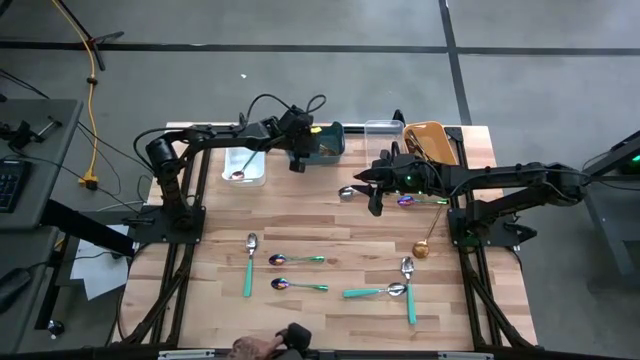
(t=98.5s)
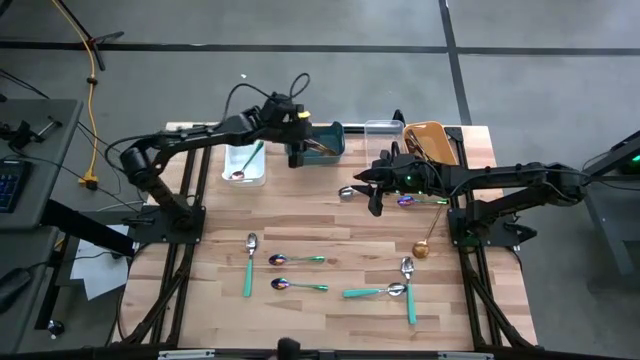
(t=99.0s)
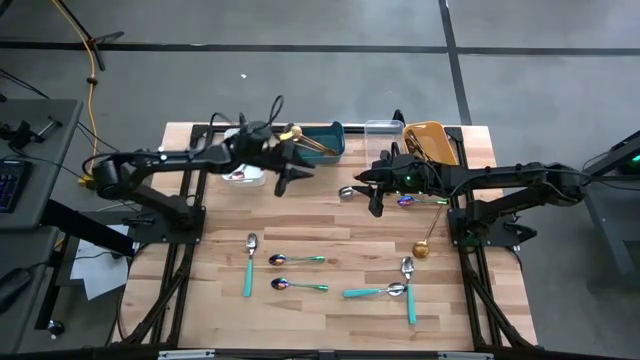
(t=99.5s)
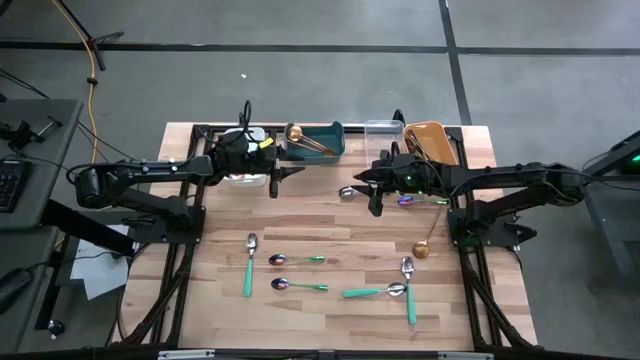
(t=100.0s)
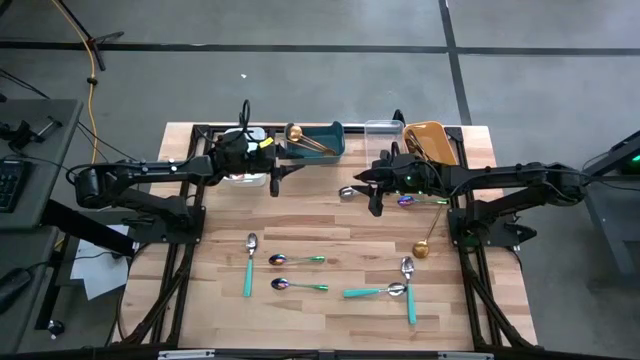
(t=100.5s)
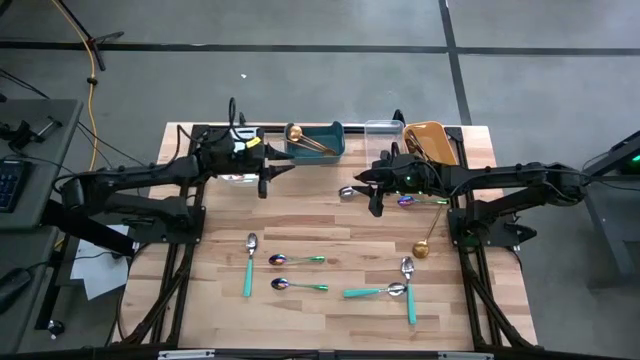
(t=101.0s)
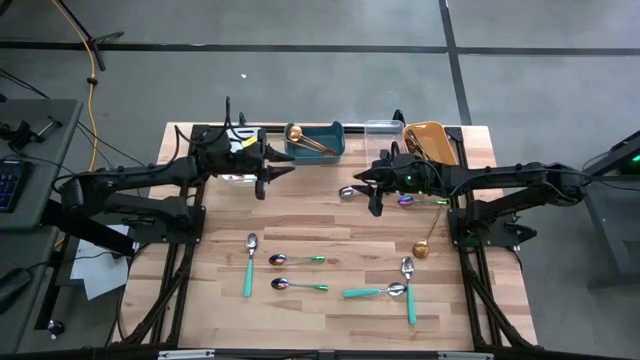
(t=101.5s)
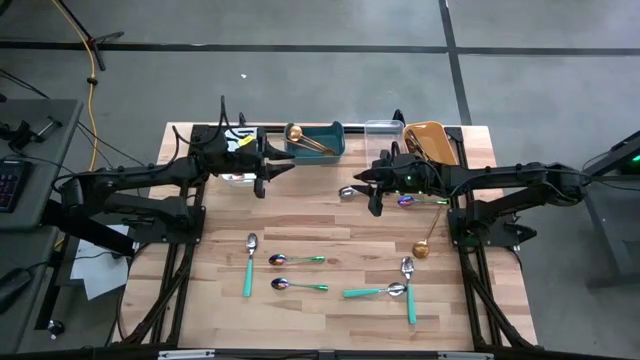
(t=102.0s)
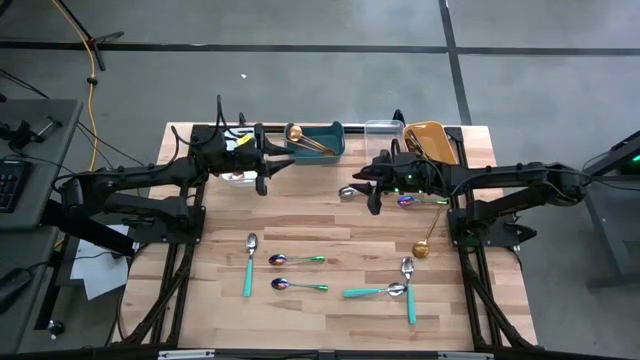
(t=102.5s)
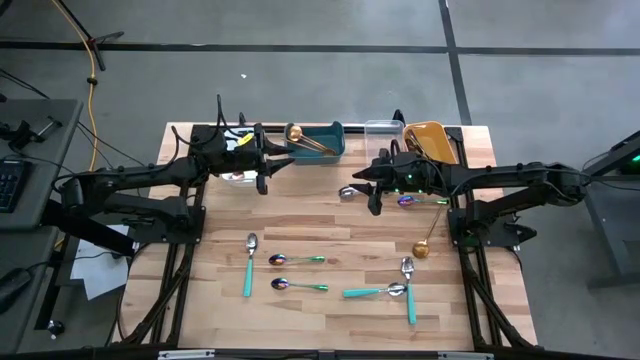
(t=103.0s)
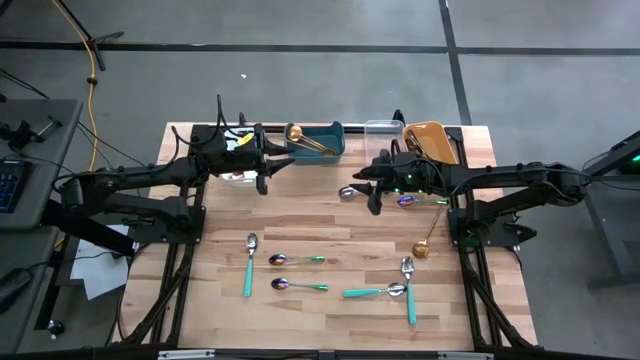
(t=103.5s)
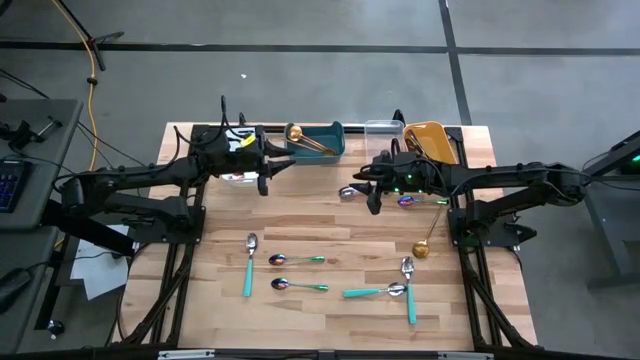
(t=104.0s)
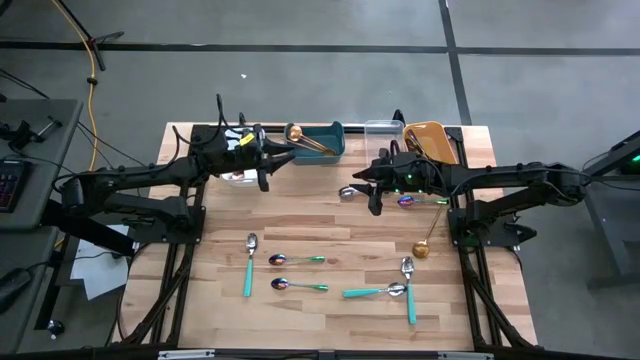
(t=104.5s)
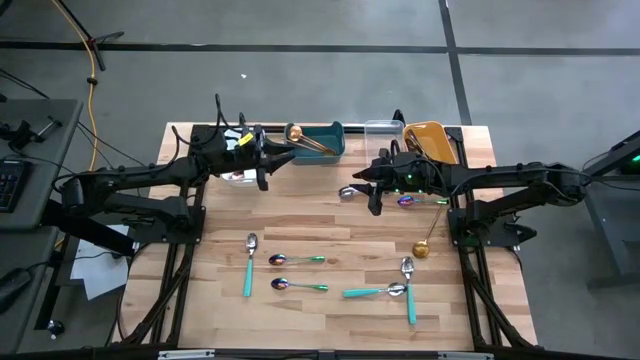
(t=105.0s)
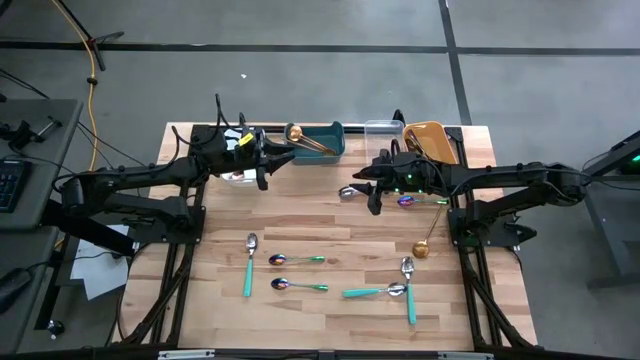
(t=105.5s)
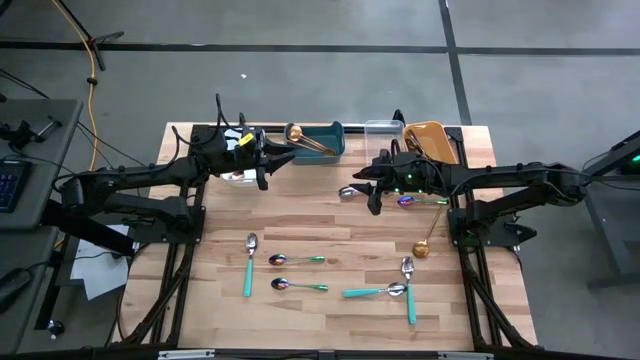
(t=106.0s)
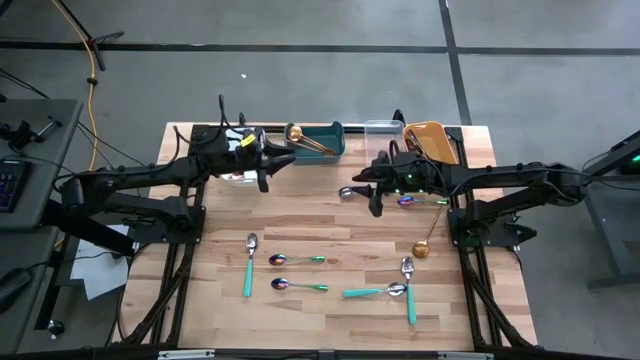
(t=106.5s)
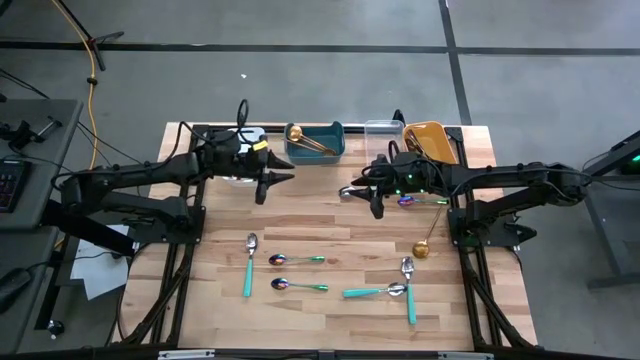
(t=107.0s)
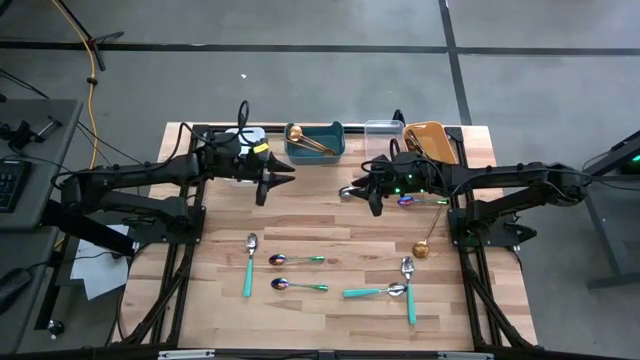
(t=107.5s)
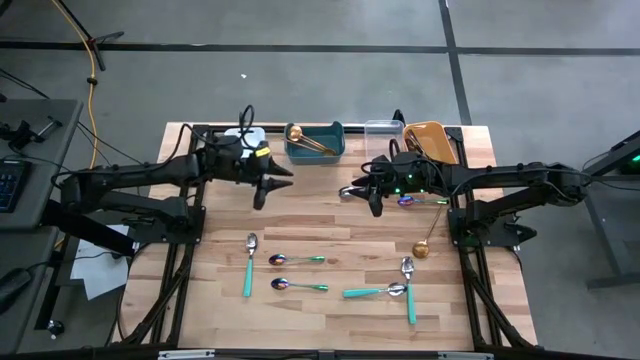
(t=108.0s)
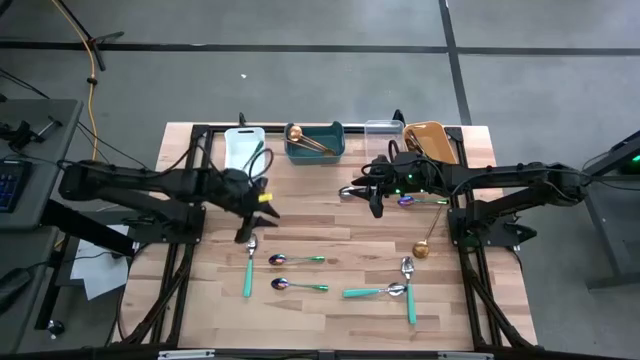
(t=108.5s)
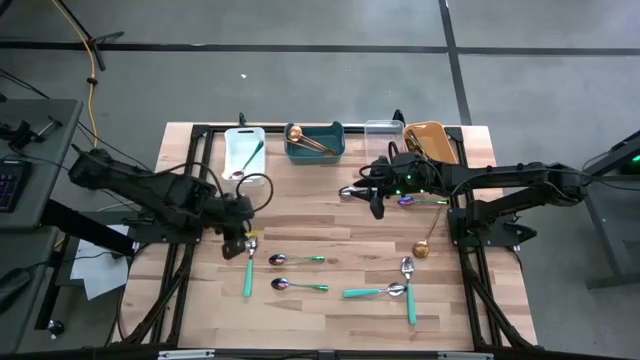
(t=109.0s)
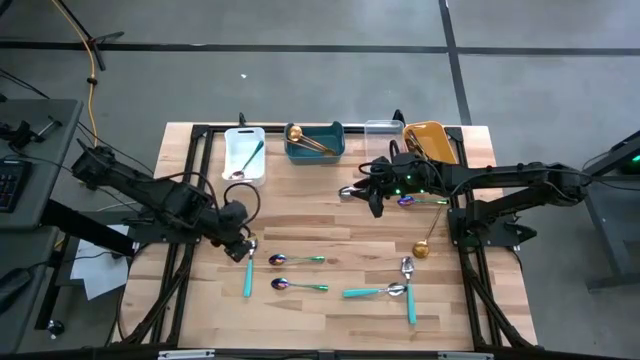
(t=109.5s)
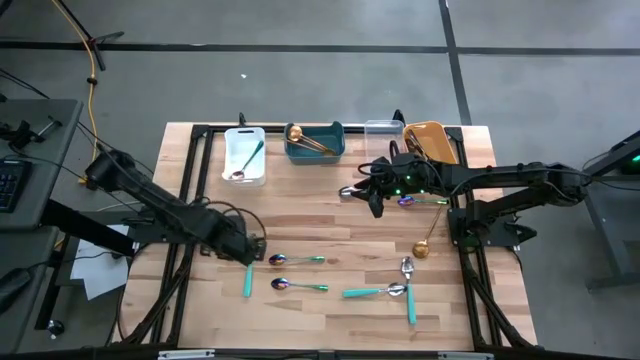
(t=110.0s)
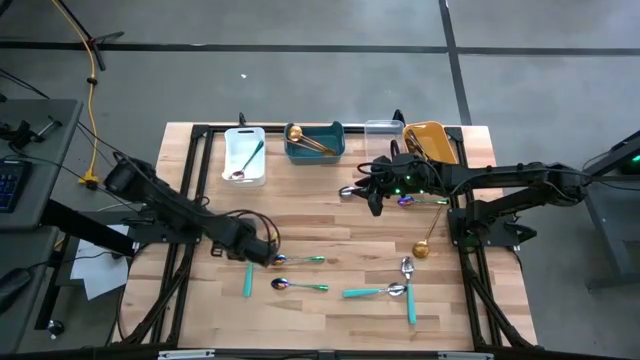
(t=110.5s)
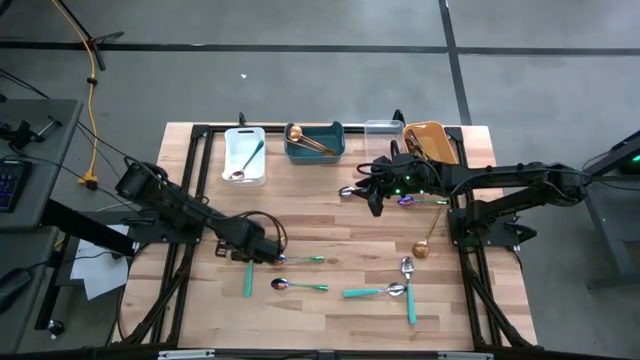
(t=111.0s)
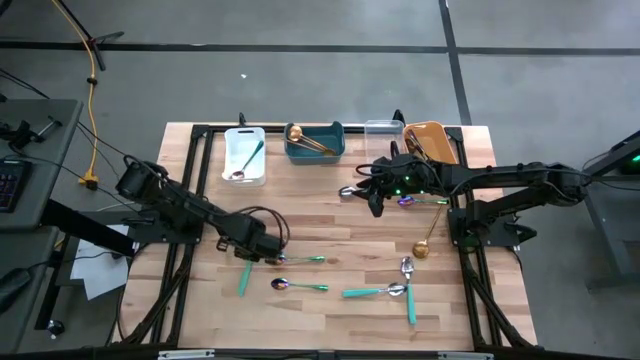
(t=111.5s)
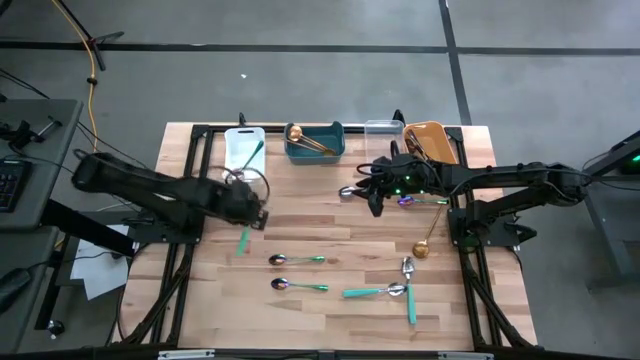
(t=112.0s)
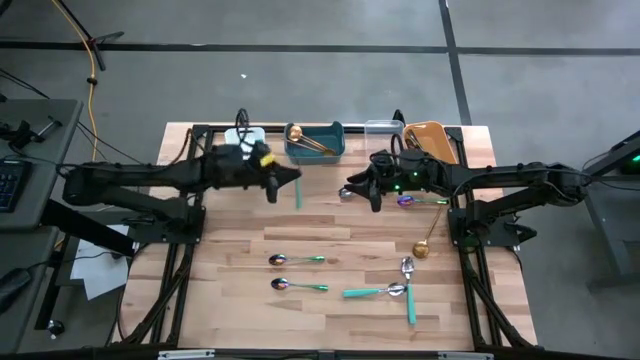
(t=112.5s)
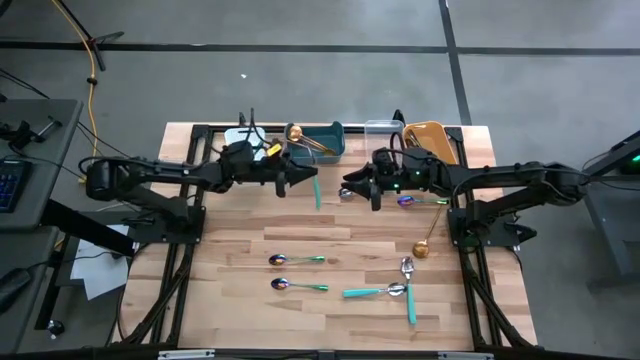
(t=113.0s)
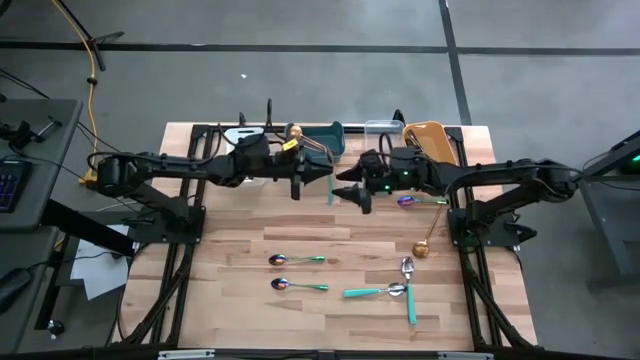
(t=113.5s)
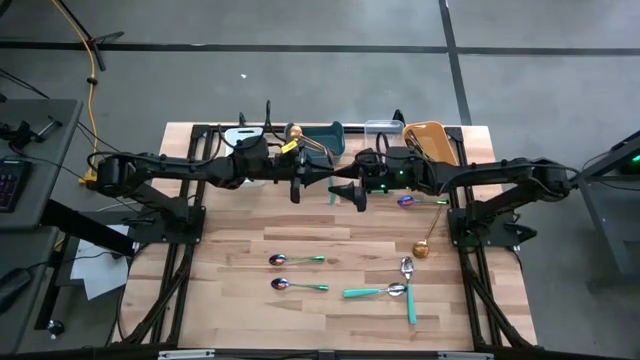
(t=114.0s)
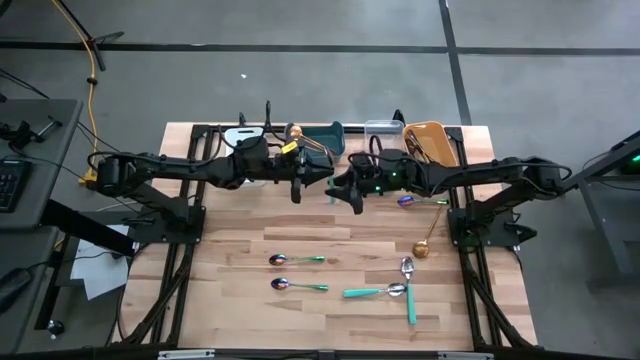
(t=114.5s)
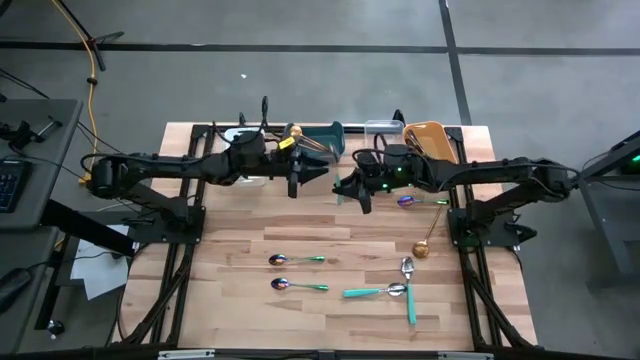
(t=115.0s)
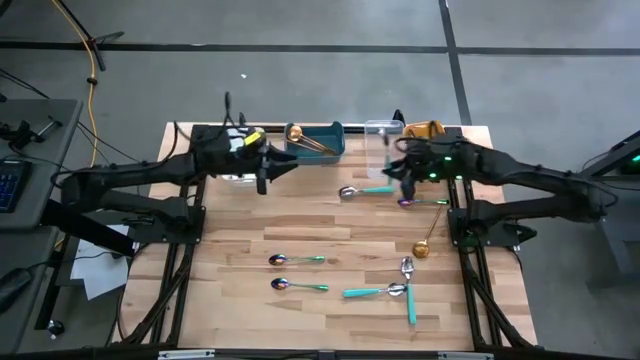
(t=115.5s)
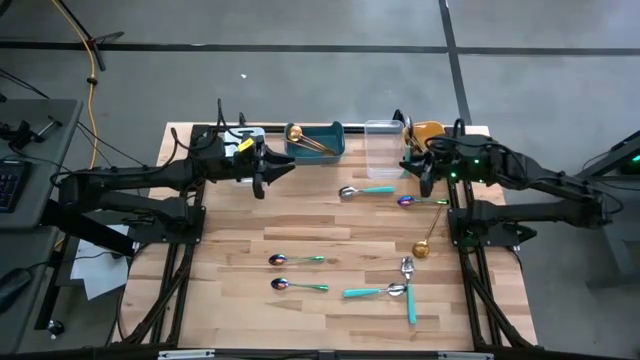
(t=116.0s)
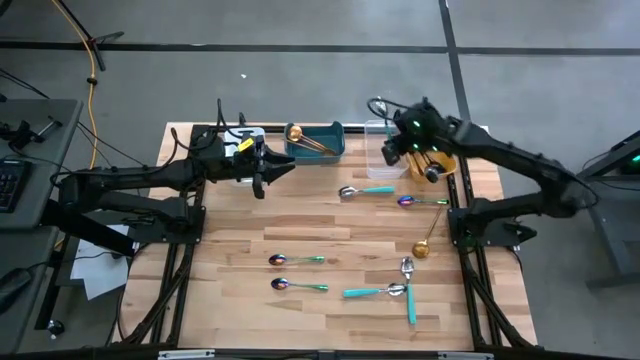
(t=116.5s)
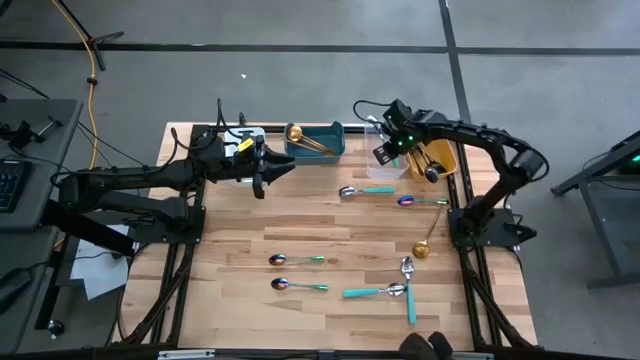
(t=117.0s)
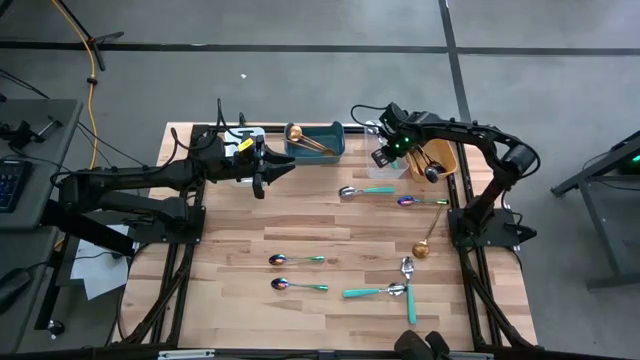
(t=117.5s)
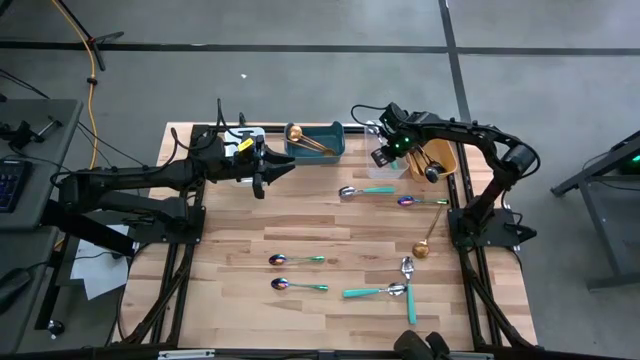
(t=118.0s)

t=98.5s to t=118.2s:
Task: Sort silverware by color (type)
Put the light blue spoon into the transparent bin

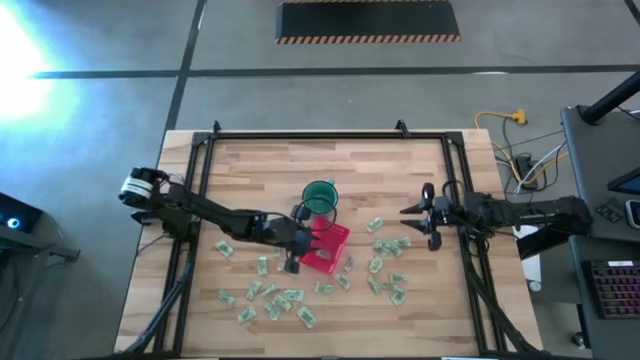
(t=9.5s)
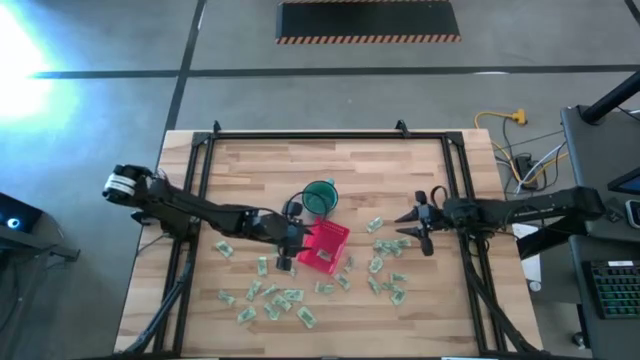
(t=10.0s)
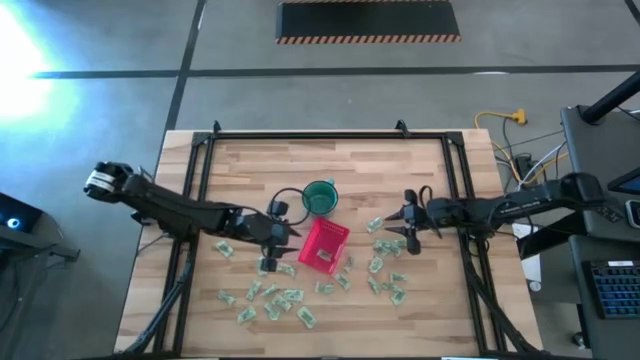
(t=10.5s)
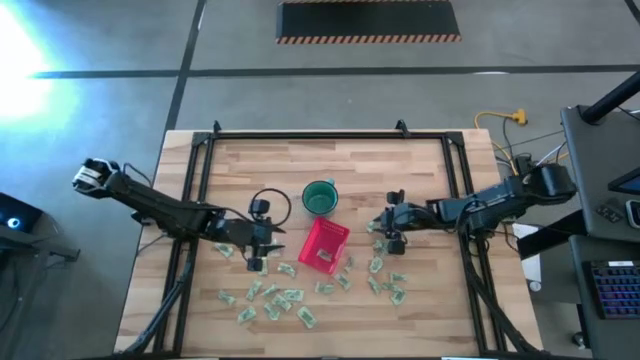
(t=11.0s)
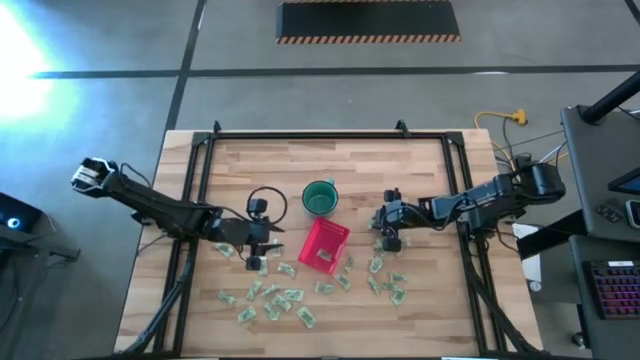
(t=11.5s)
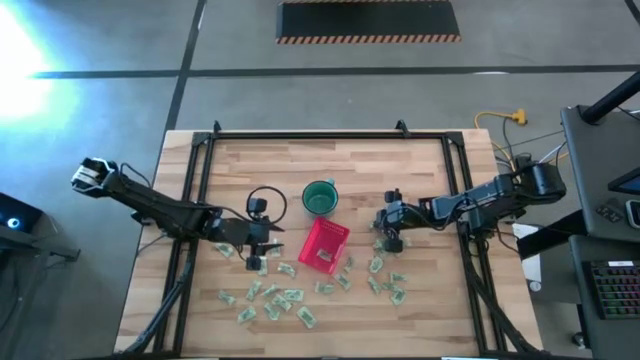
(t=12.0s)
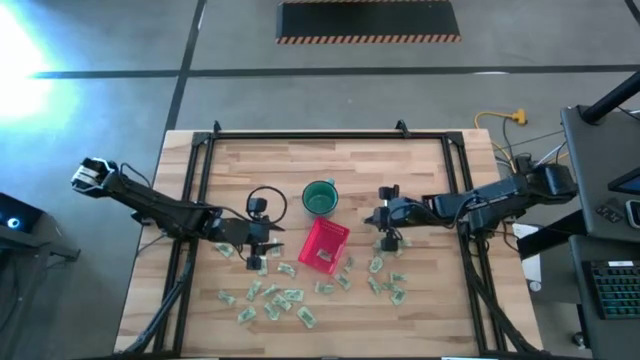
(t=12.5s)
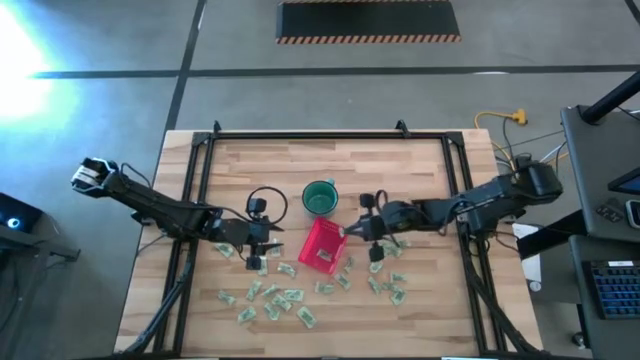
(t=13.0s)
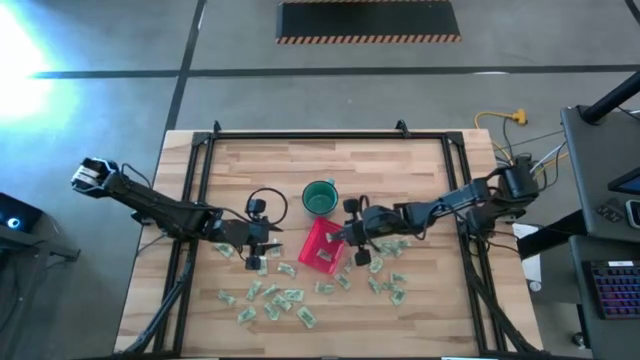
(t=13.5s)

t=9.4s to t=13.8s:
Task: Pick and place items into bin
Put the light green stevia packet into the red bin
